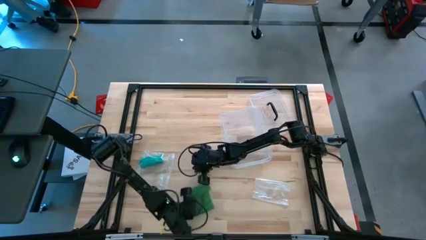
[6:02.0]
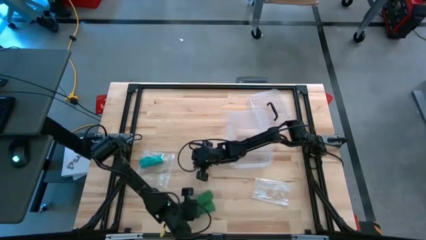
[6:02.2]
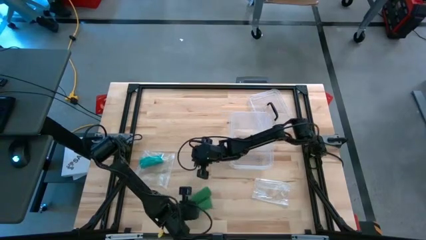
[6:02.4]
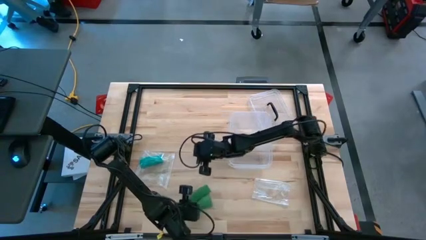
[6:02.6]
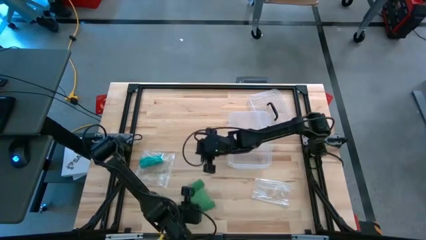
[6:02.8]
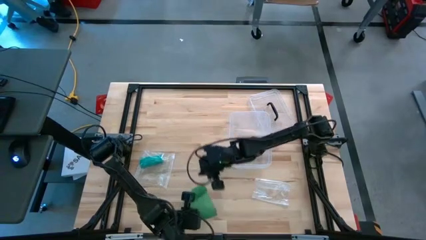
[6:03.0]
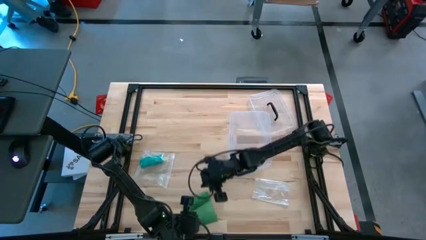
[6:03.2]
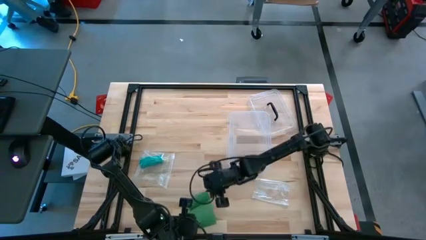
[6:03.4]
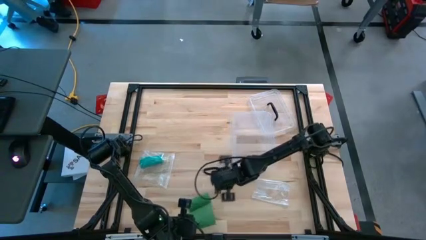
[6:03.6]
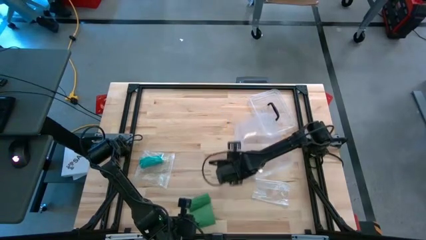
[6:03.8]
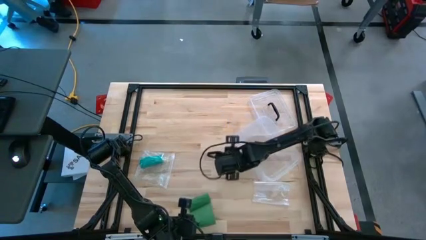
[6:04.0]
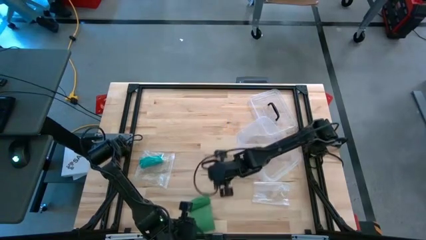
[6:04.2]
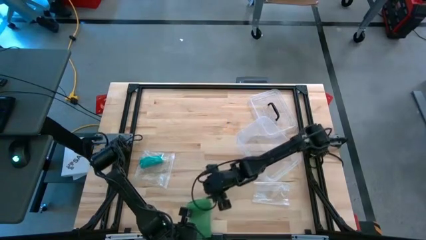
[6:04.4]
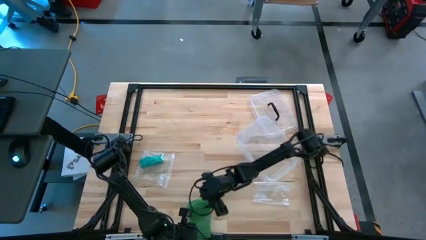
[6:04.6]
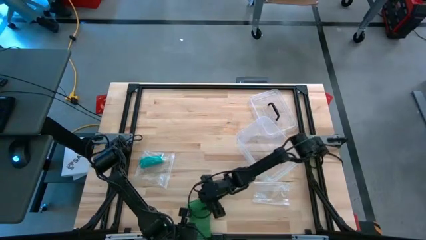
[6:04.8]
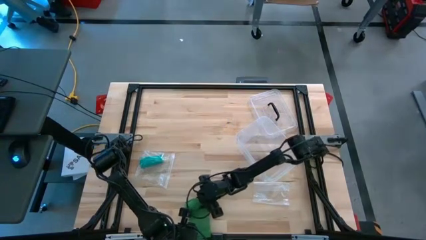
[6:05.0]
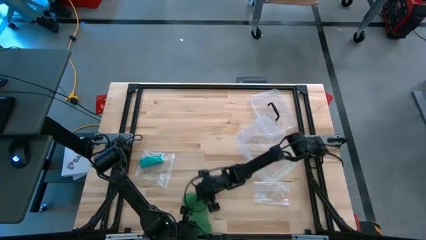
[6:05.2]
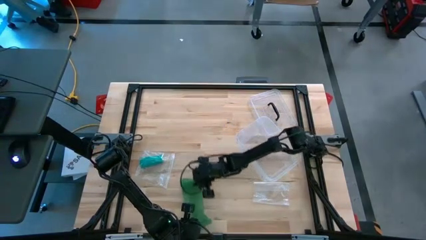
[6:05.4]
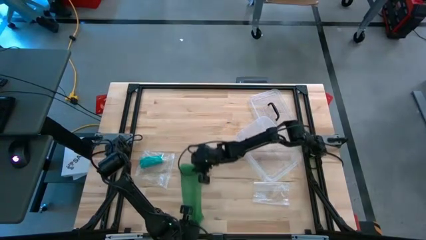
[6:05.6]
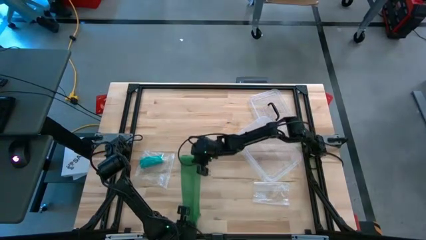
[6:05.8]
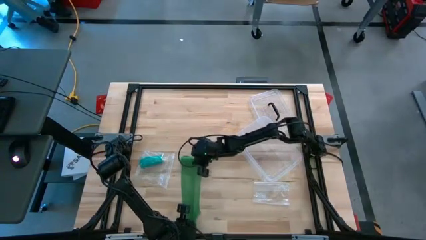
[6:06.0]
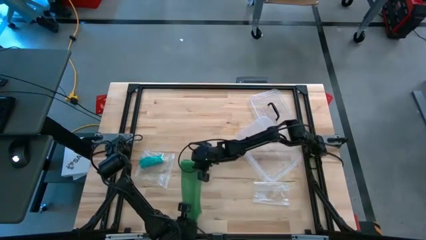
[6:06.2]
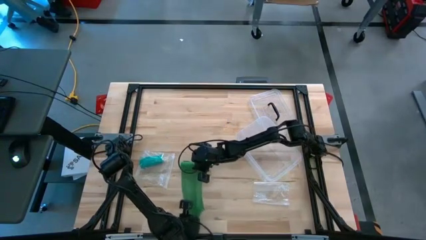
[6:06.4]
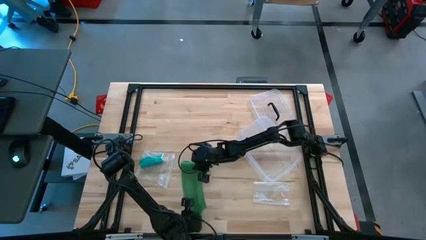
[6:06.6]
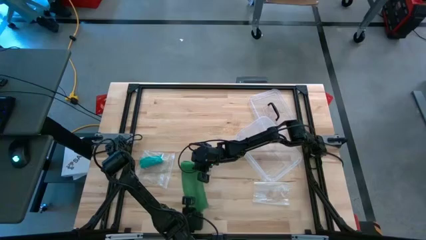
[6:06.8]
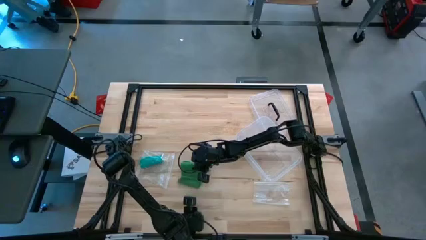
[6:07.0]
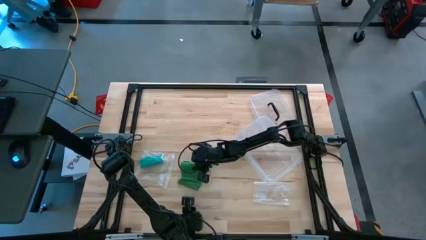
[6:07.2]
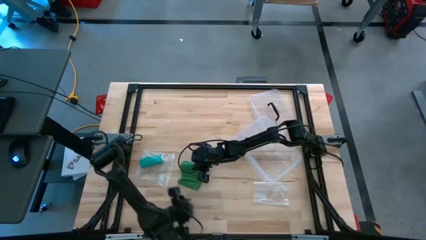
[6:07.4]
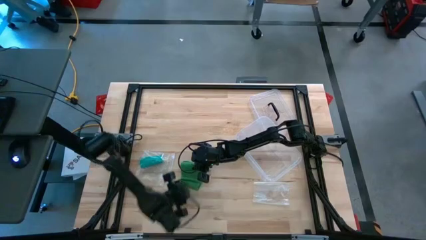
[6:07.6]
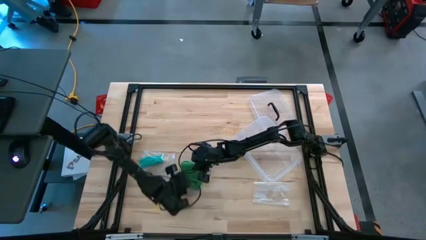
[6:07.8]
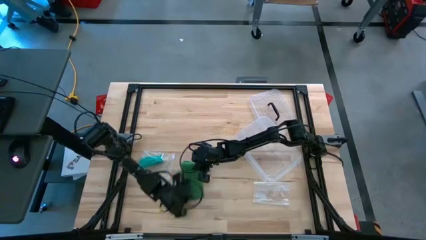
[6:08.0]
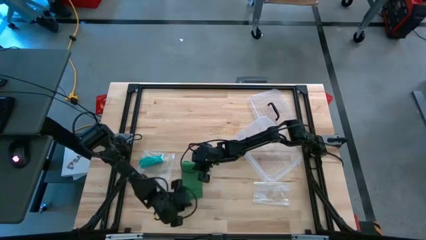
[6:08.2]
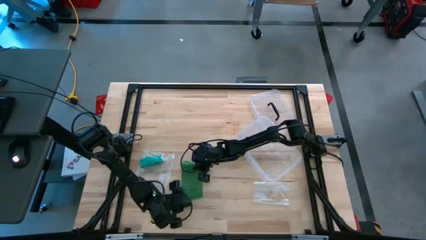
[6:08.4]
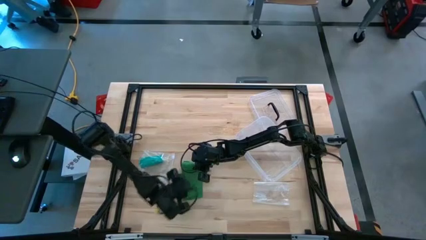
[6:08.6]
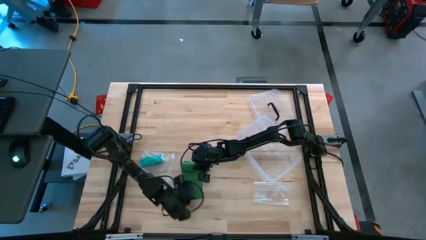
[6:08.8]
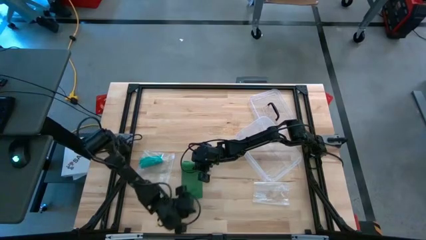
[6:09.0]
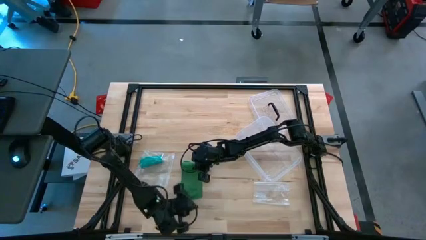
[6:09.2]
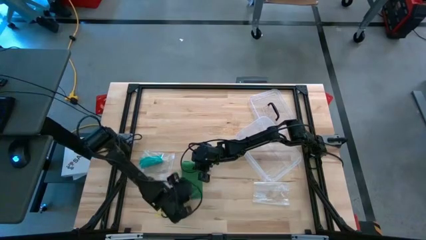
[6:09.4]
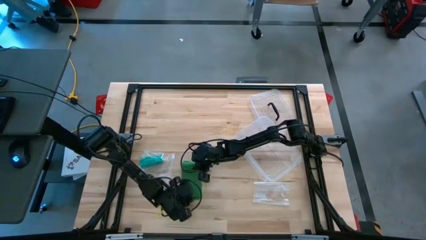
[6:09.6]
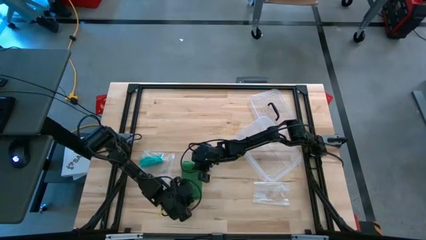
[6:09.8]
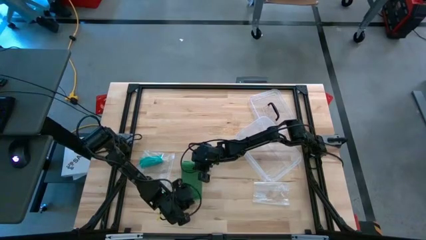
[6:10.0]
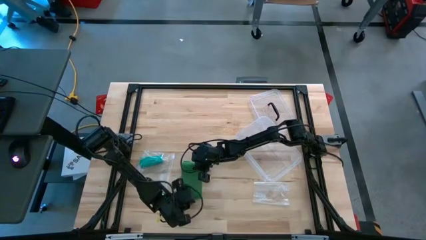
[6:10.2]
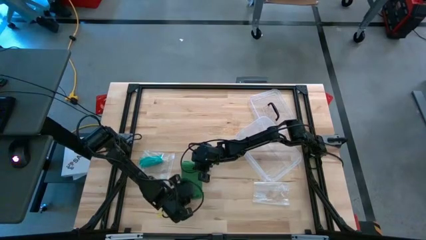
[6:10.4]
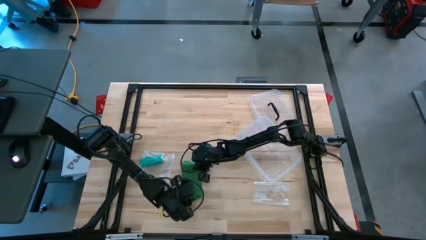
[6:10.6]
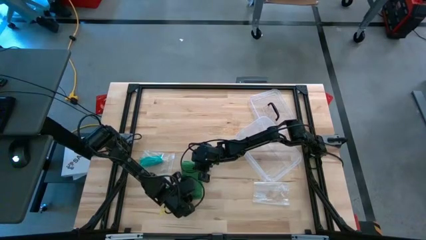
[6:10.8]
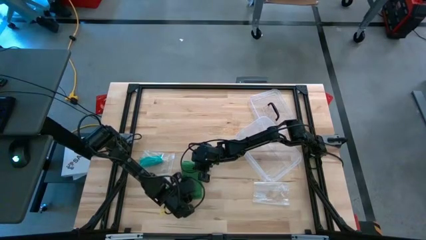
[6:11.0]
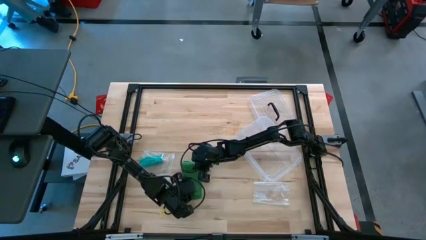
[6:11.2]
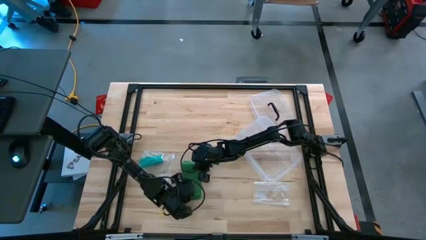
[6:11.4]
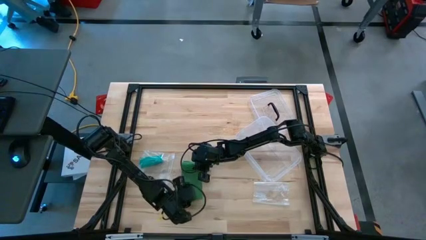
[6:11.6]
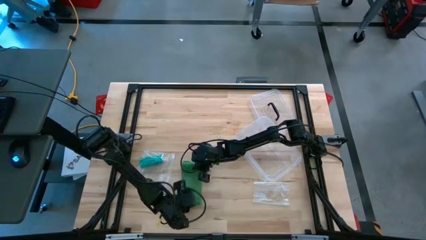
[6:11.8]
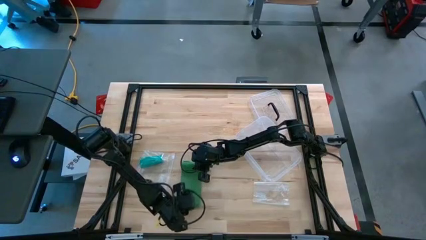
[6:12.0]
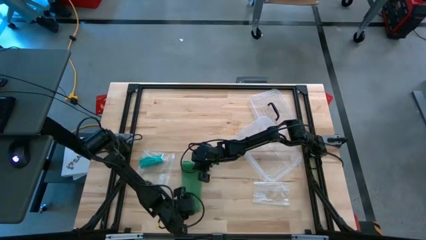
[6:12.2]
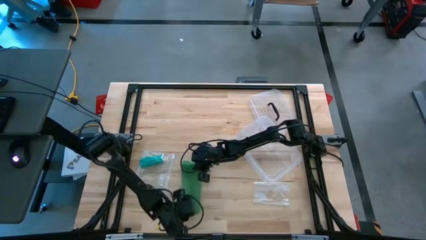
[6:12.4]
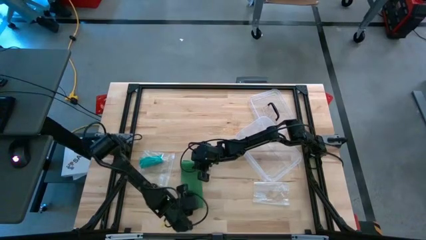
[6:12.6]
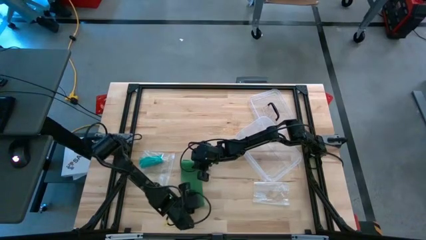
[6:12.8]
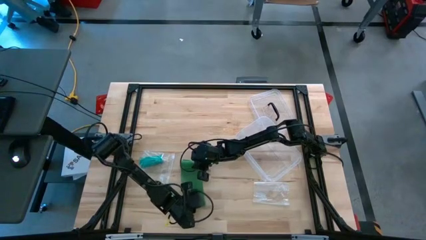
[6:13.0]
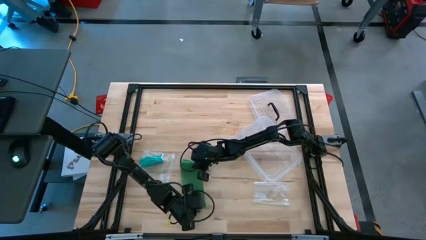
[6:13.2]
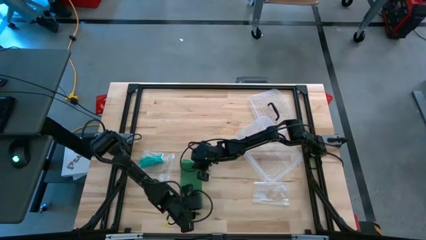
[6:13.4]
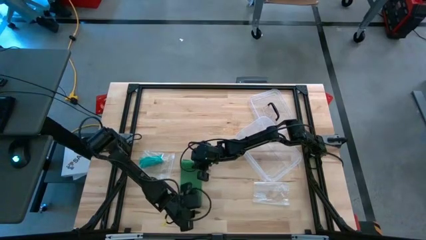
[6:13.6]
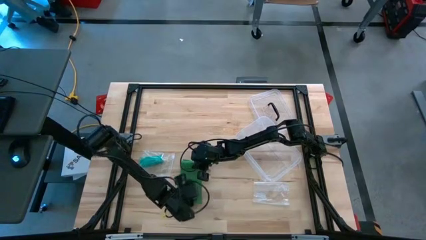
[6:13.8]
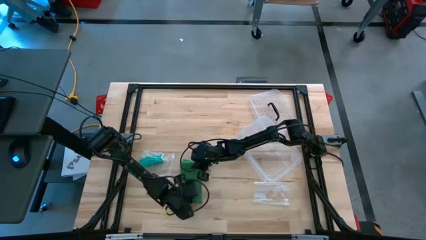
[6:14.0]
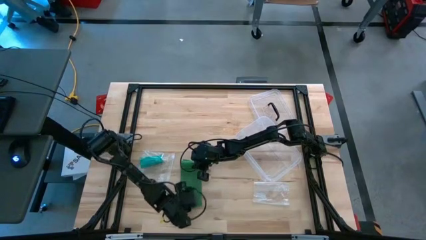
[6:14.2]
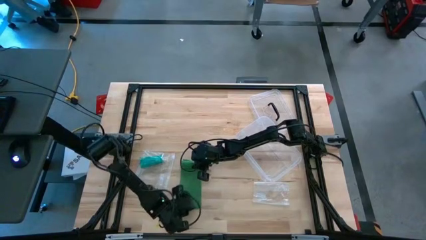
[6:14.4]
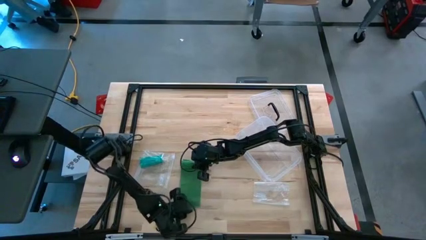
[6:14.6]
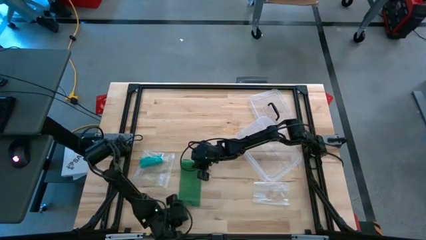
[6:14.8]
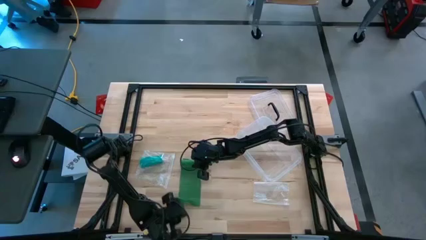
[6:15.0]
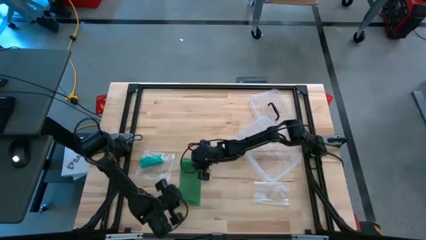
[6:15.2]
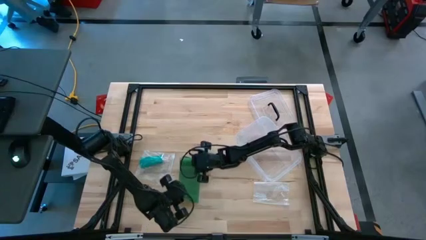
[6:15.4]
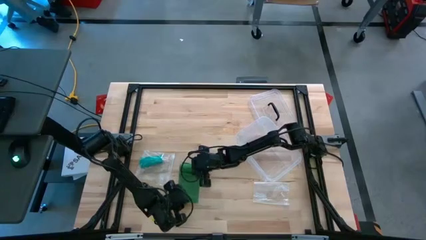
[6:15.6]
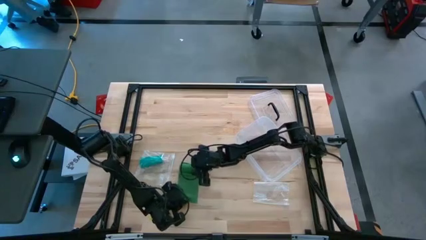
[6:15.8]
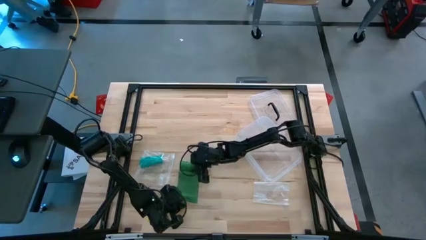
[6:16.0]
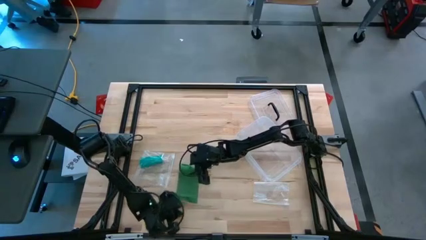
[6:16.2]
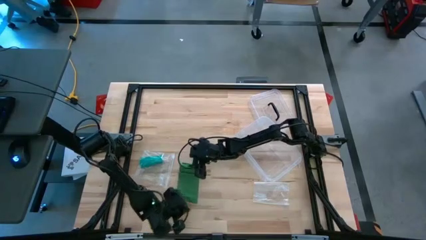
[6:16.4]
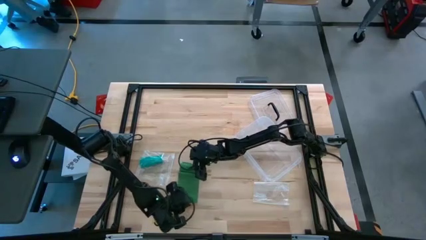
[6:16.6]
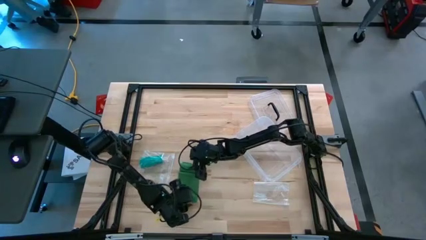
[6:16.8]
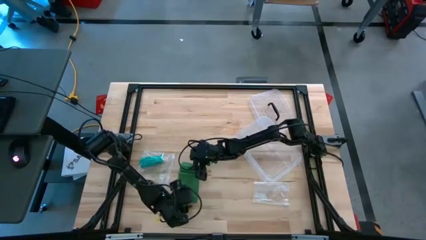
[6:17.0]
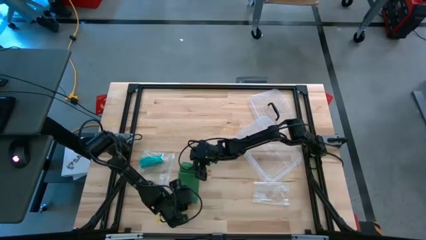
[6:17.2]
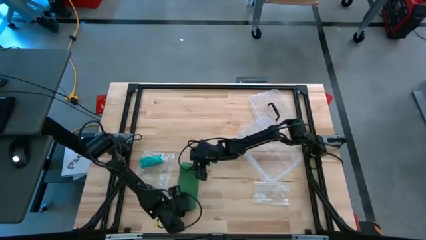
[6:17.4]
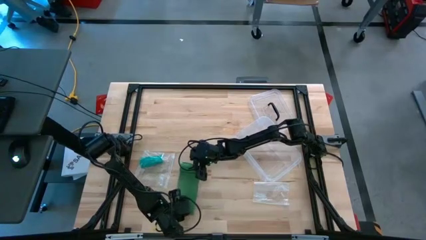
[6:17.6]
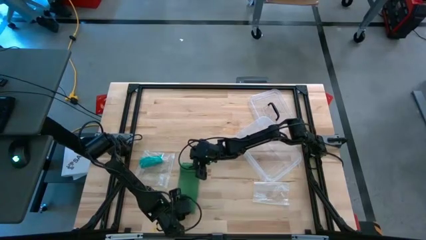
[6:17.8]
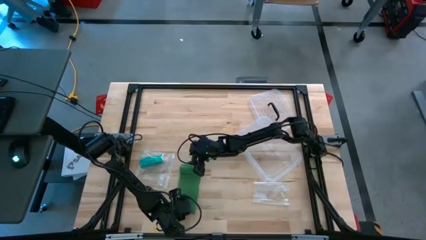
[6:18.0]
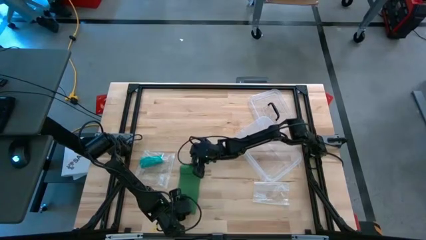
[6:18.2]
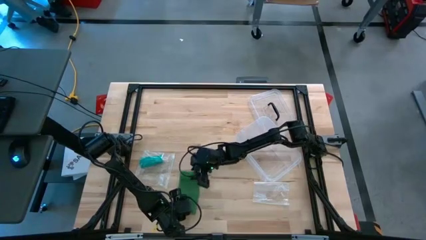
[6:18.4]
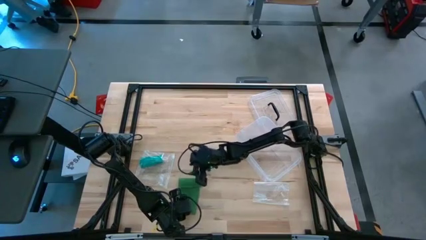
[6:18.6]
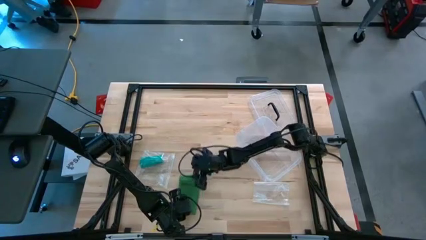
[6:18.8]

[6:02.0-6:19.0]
Task: Roll bandage
Roll the green bandage
